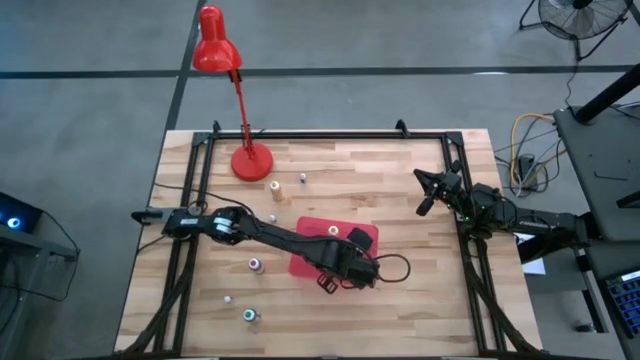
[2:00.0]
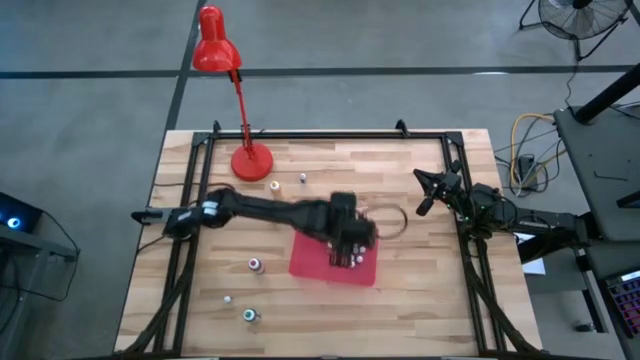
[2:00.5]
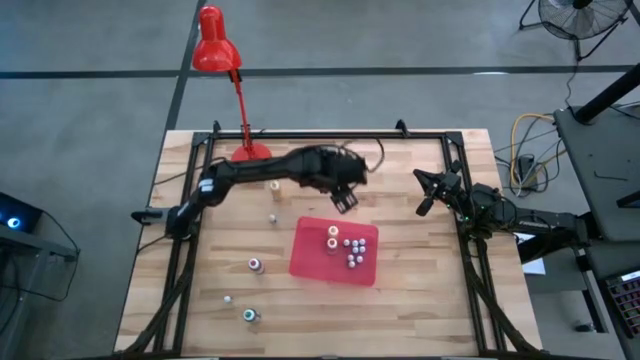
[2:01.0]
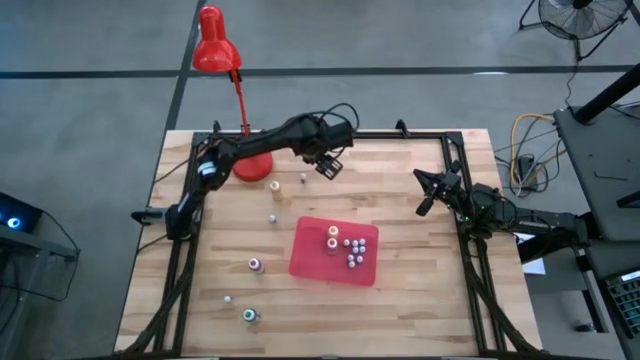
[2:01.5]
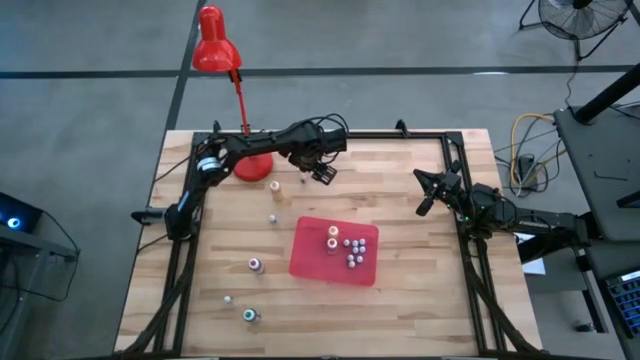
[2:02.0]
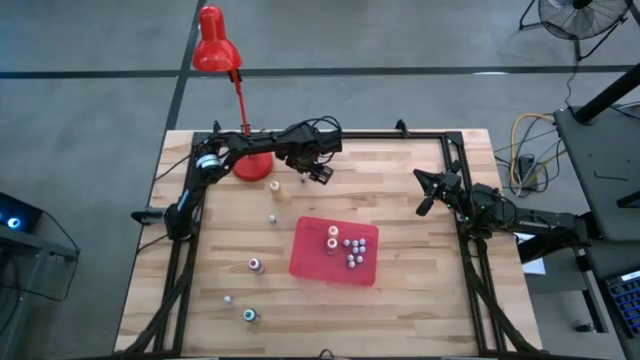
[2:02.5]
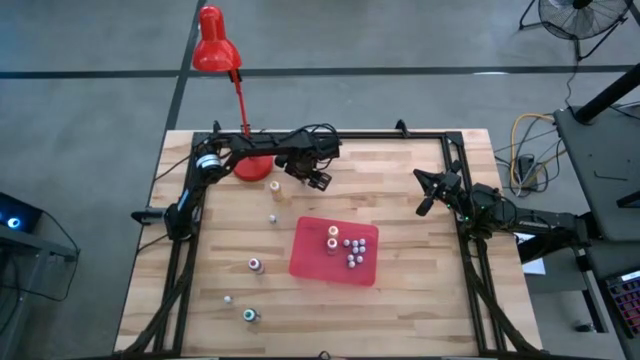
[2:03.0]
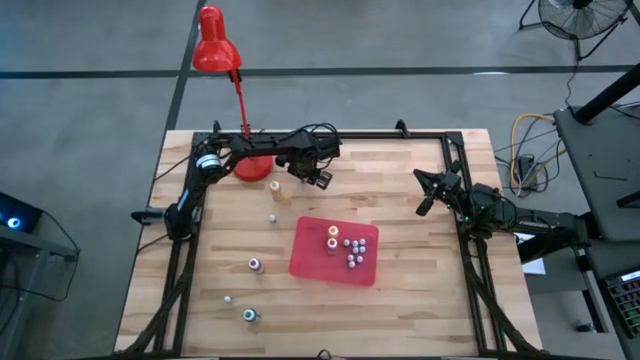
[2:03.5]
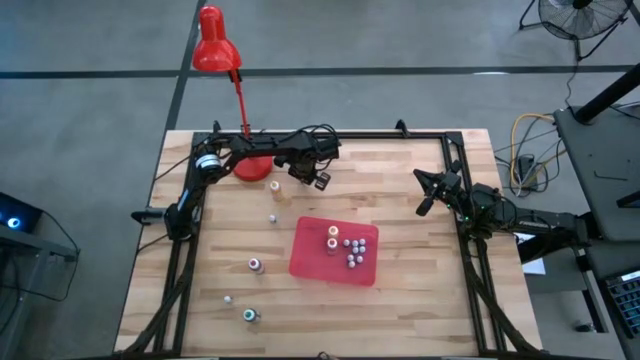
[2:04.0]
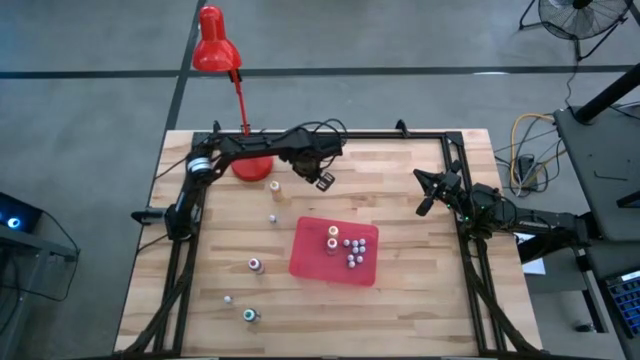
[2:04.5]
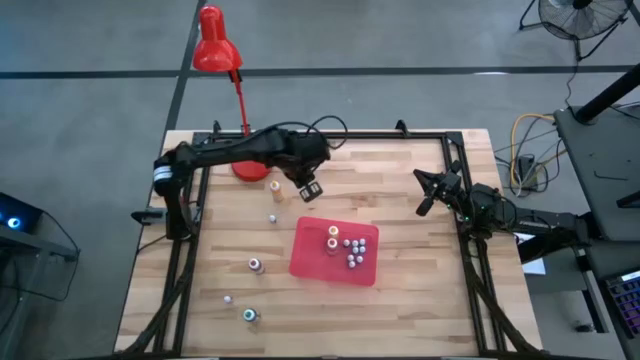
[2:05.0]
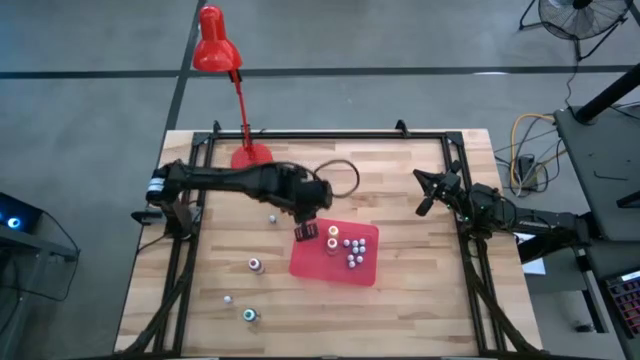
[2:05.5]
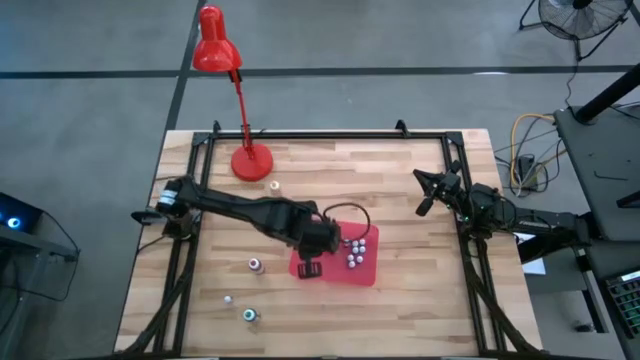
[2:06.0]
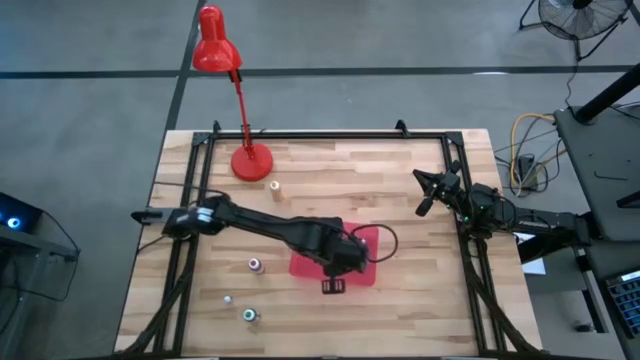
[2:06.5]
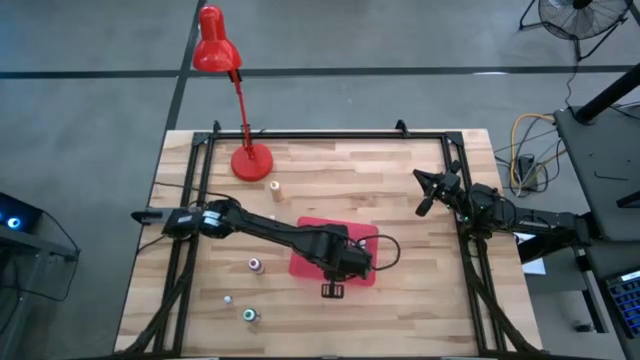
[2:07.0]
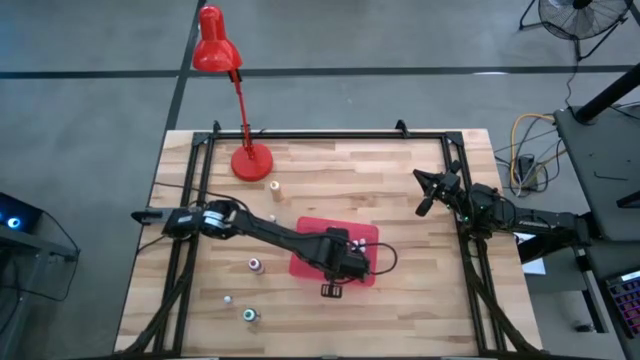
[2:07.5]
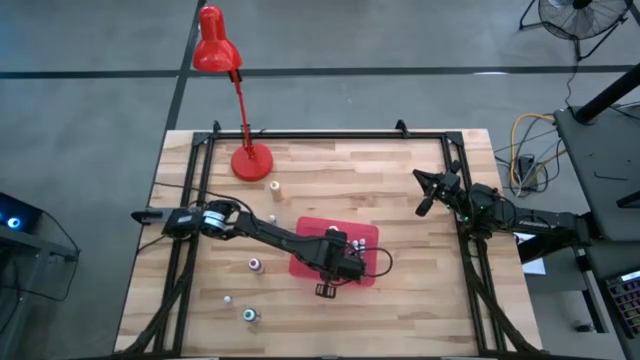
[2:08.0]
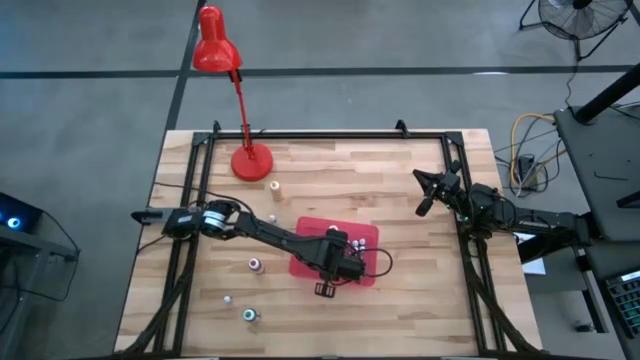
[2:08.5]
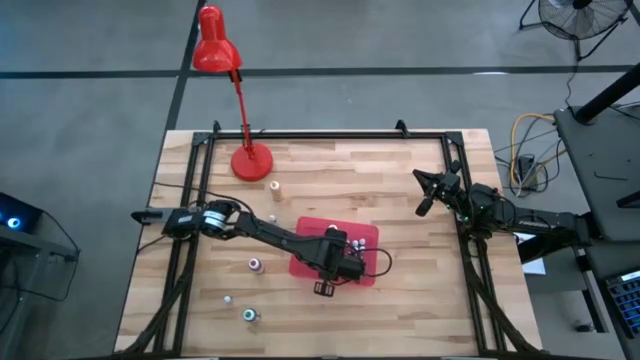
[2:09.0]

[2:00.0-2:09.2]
Task: Pick & Place food coloring
Put the small black food coloring bottle in the red bin

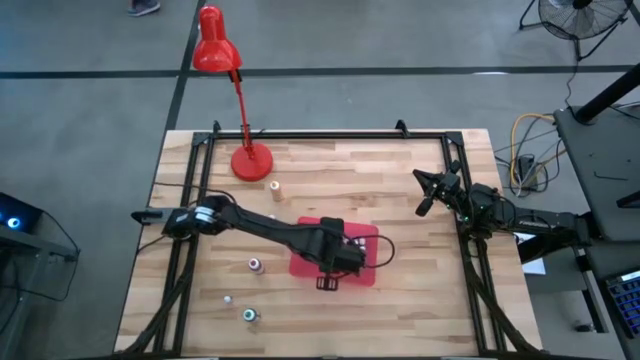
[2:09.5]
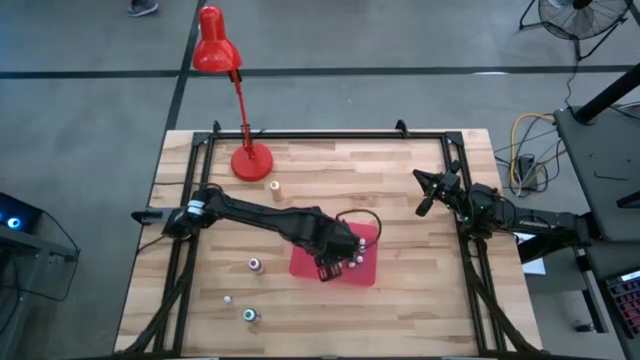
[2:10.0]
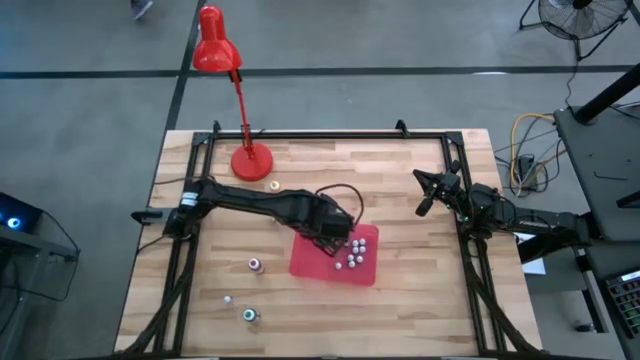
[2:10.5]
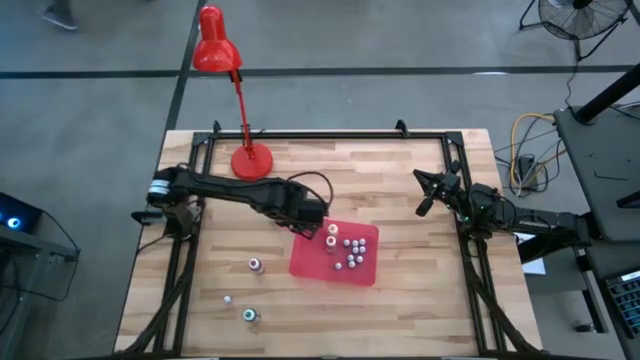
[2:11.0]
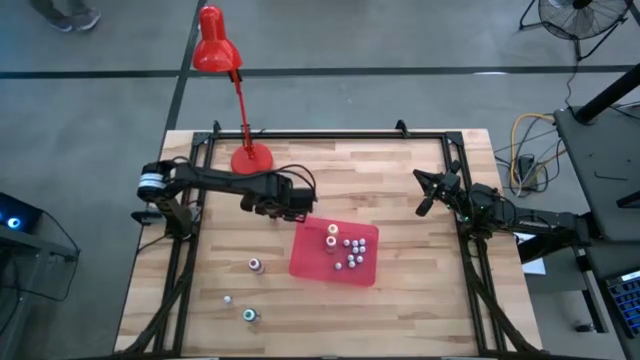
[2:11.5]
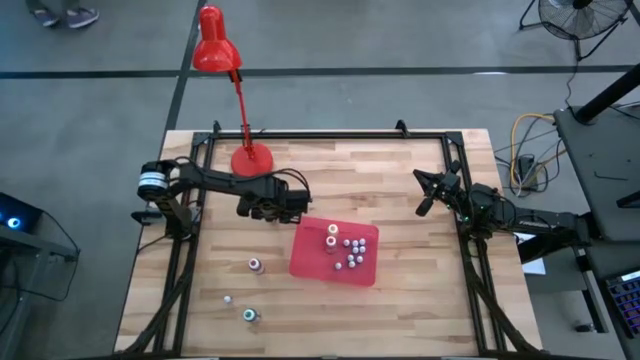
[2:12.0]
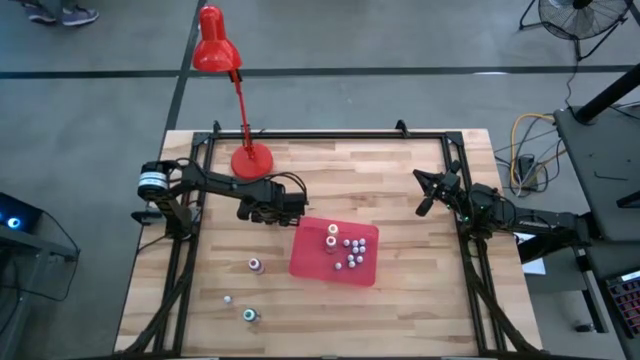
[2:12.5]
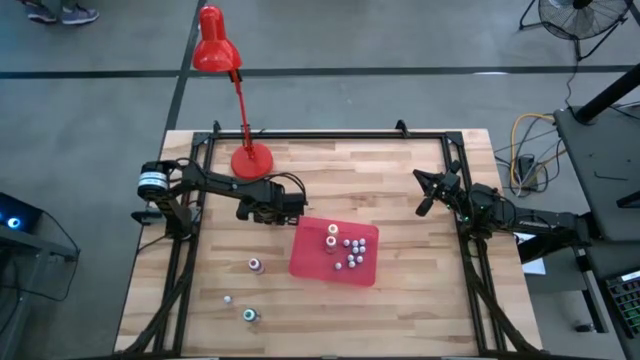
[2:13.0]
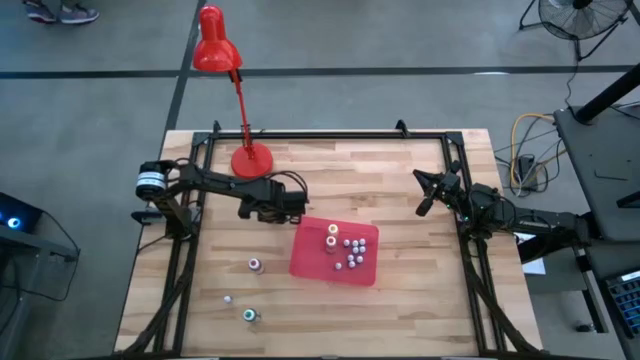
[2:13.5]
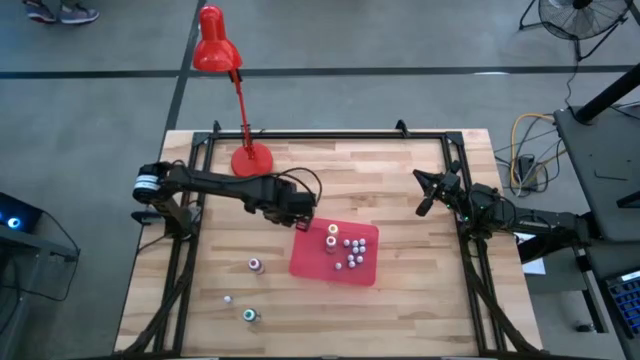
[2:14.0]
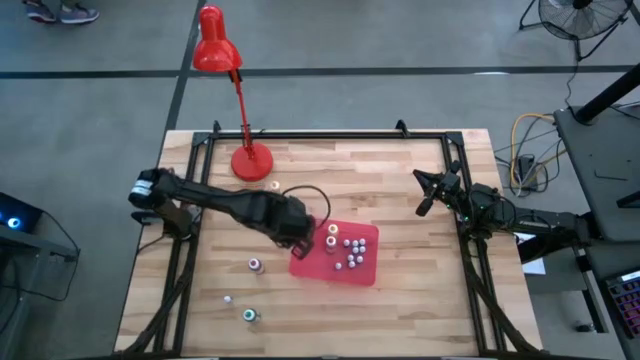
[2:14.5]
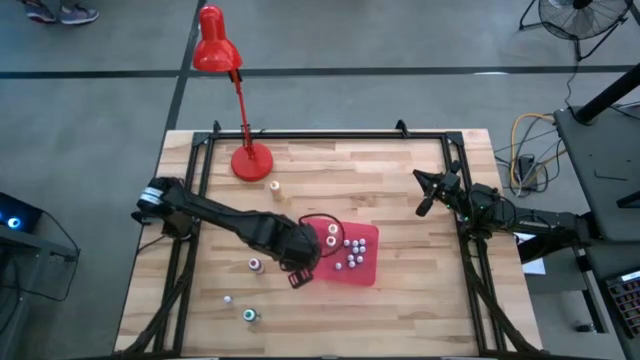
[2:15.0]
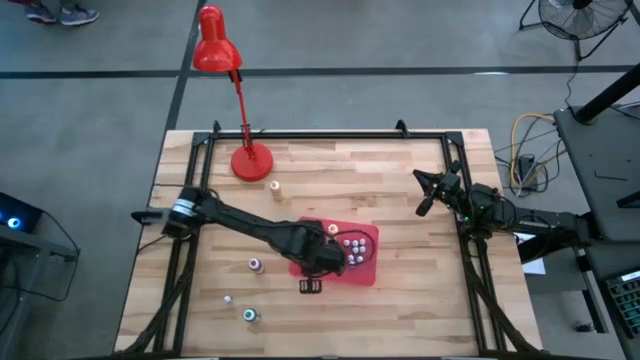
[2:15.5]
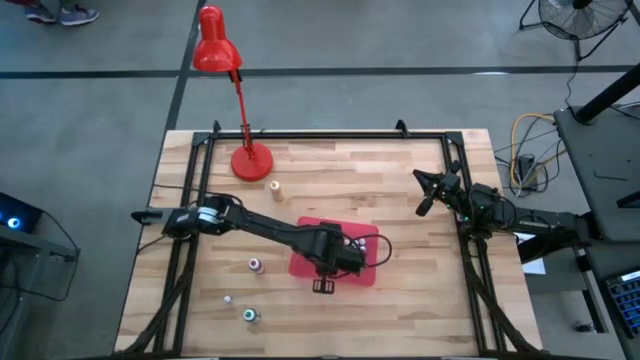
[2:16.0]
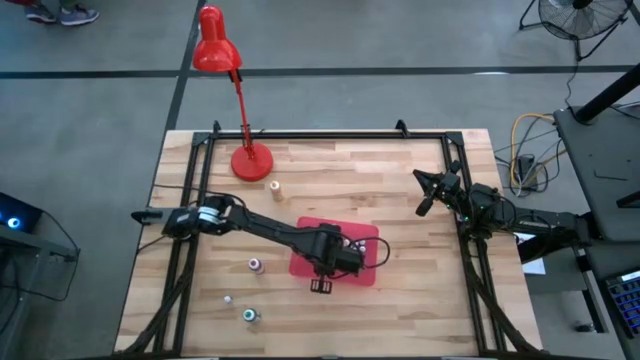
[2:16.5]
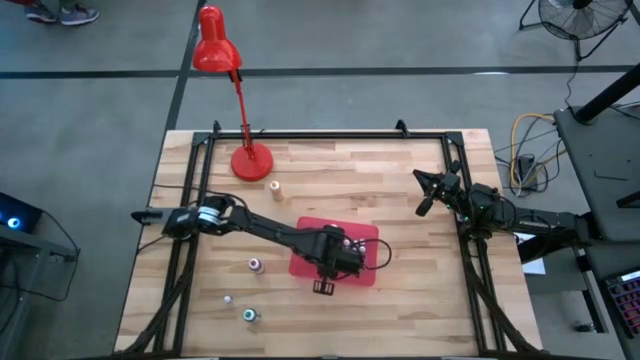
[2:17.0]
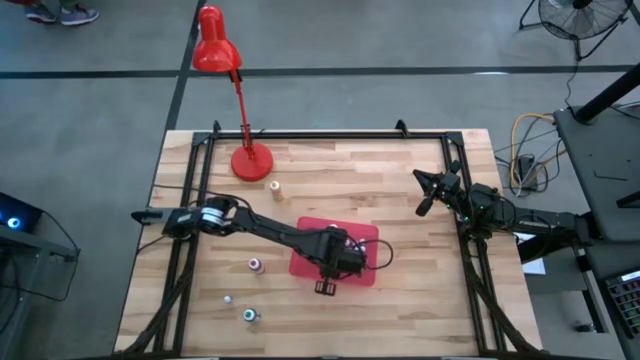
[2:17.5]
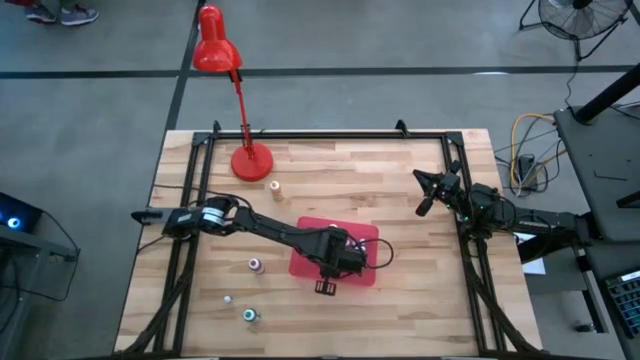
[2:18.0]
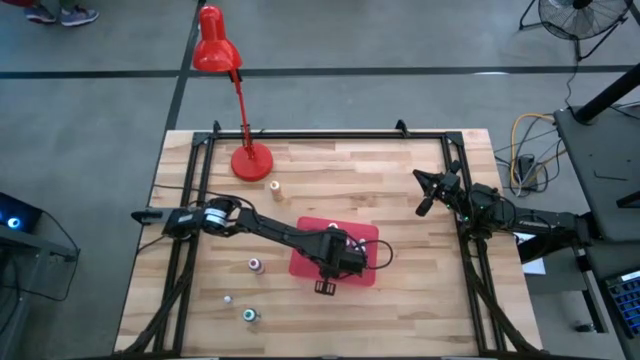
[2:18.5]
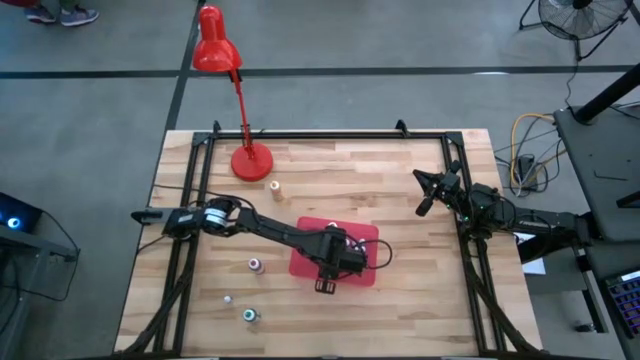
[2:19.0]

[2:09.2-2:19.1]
Put the small black food coloring bottle in the red bin

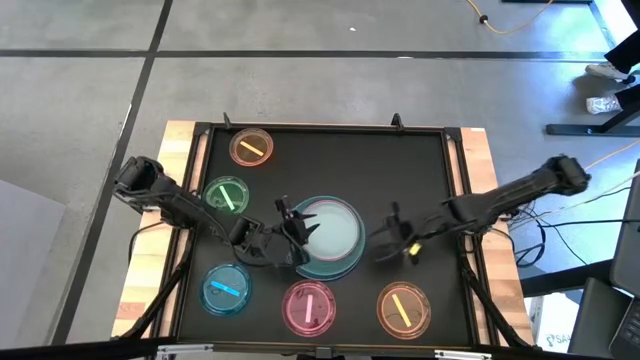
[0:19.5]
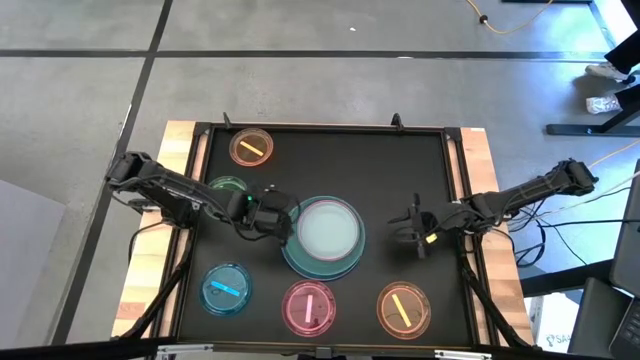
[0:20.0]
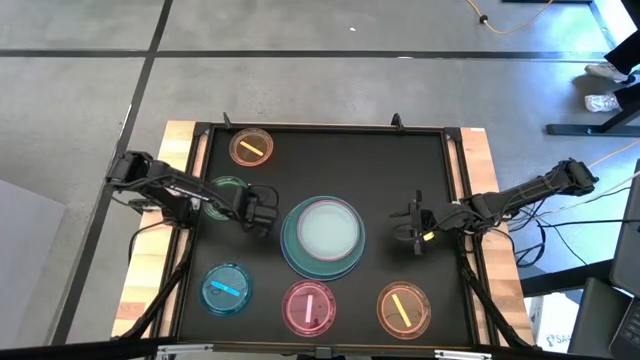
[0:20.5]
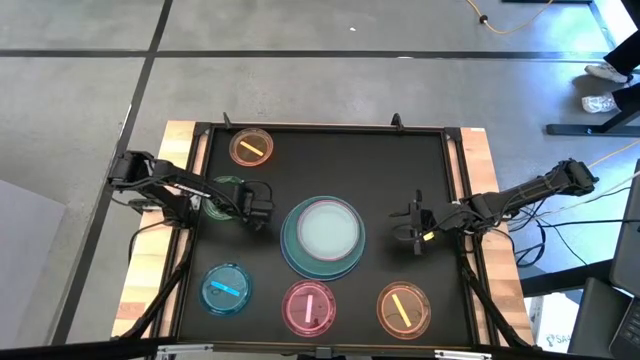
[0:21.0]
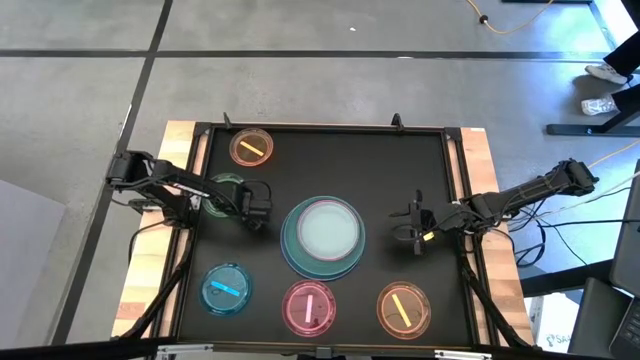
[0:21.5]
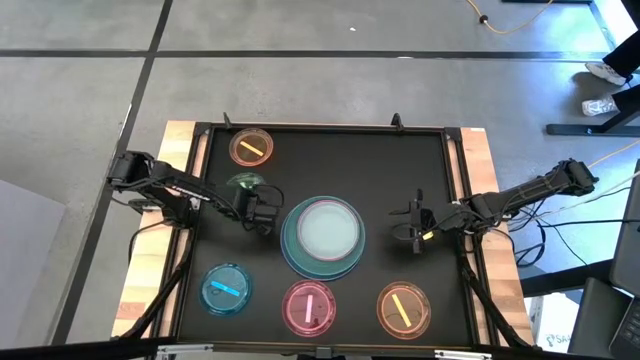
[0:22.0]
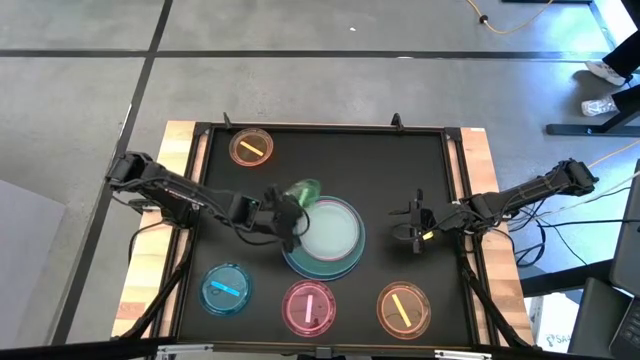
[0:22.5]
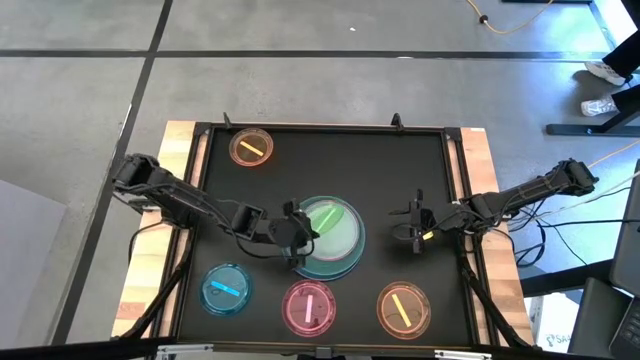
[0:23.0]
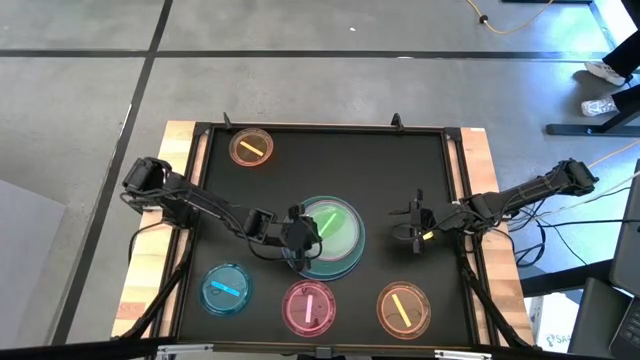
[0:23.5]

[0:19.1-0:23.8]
Task: Stack plastic plates
Stack the small light green plate on the medium gray plate
